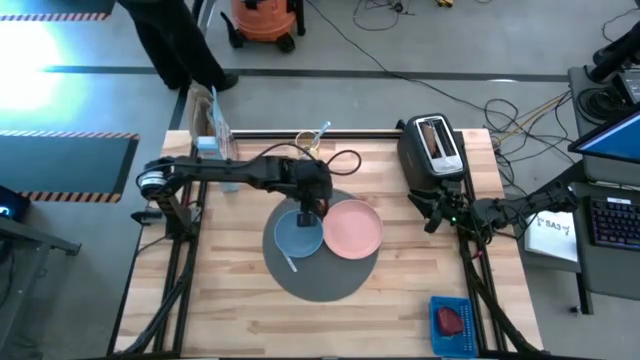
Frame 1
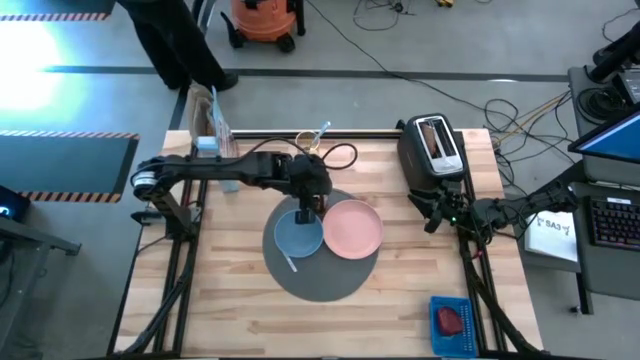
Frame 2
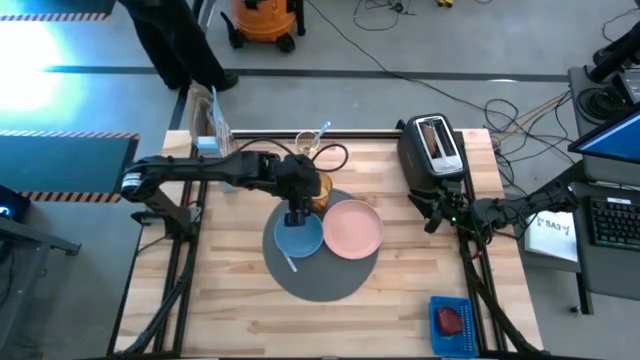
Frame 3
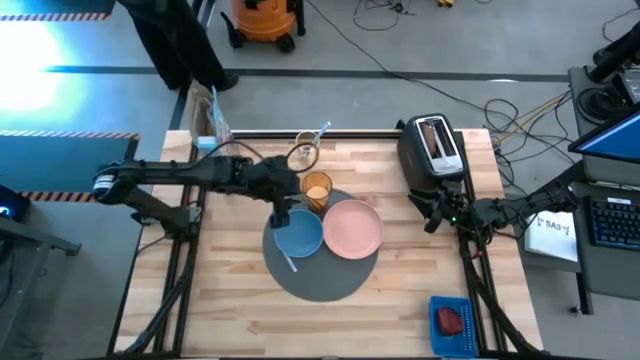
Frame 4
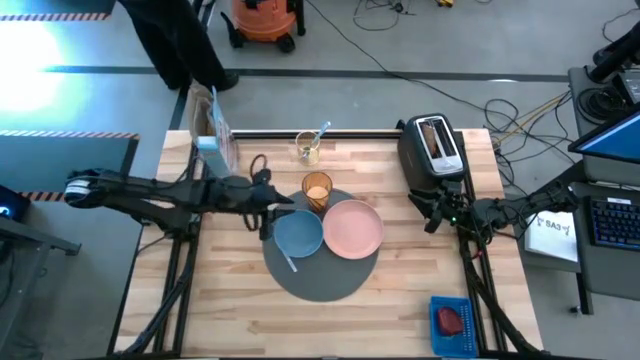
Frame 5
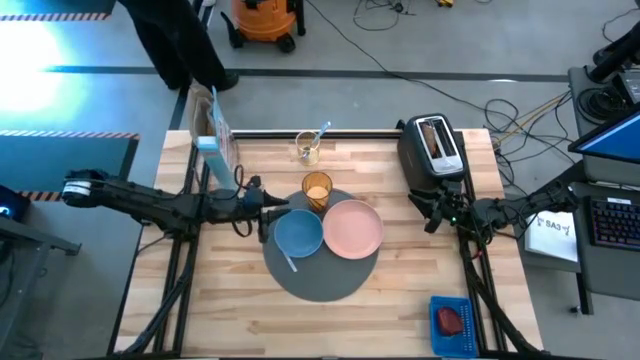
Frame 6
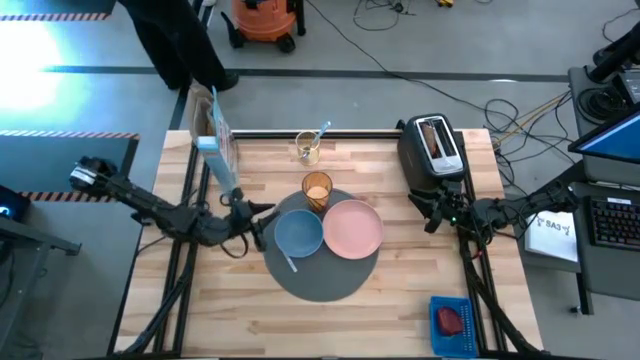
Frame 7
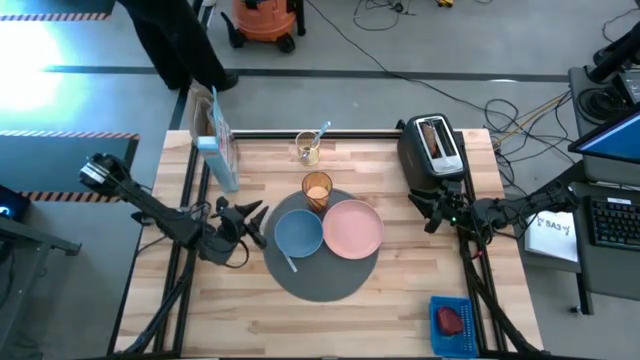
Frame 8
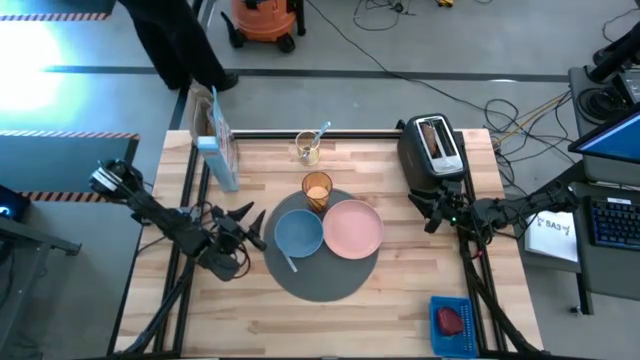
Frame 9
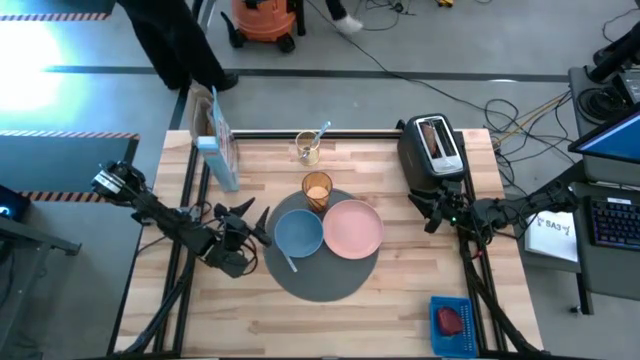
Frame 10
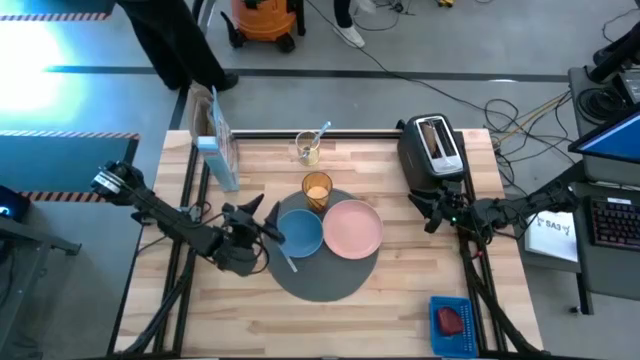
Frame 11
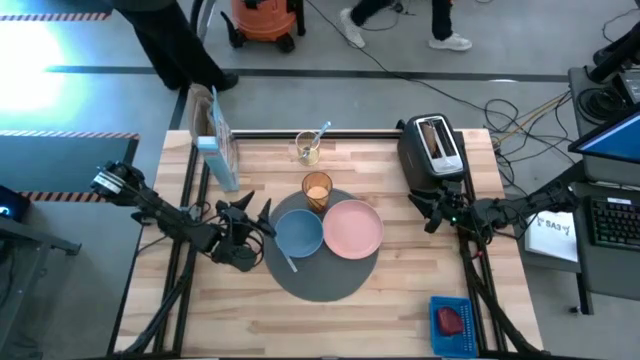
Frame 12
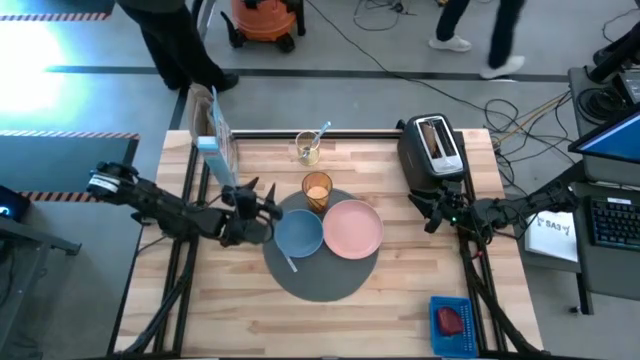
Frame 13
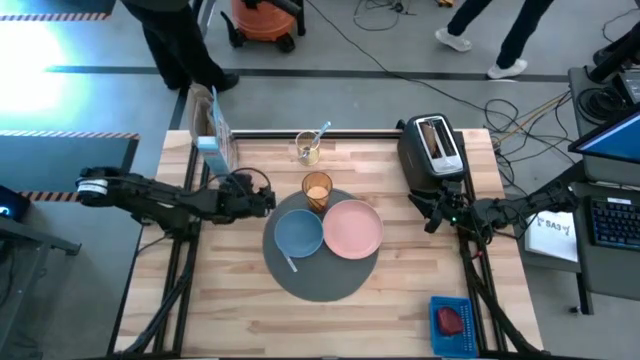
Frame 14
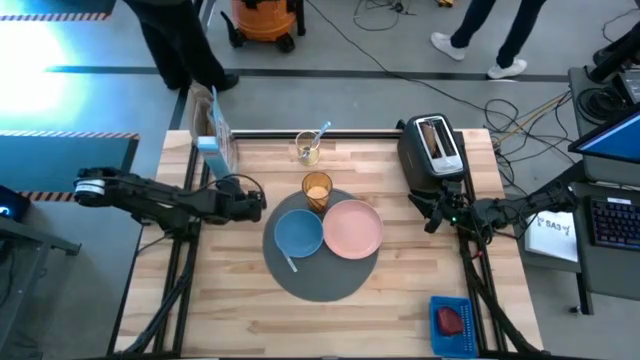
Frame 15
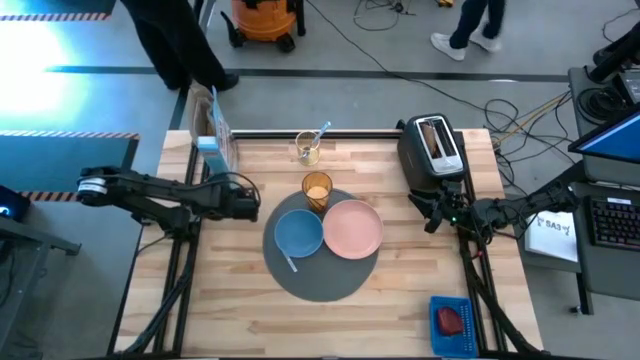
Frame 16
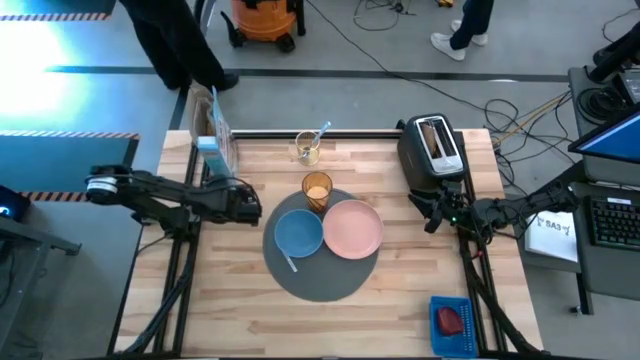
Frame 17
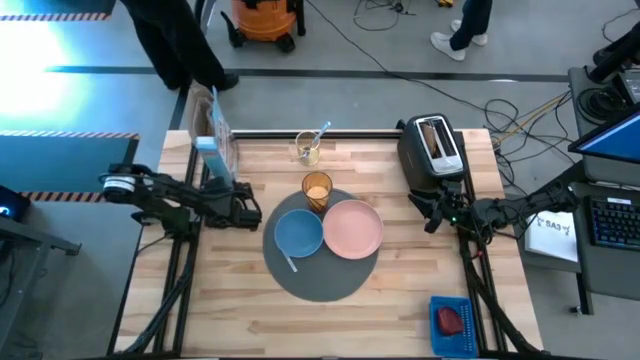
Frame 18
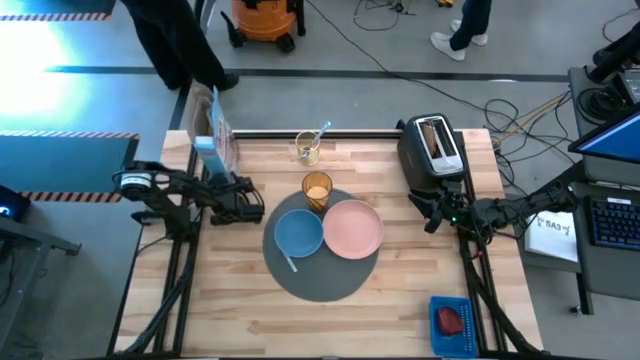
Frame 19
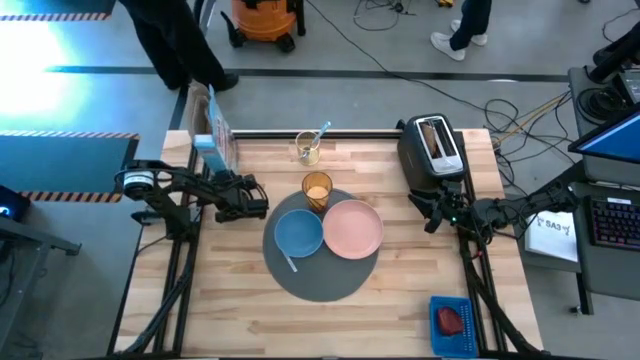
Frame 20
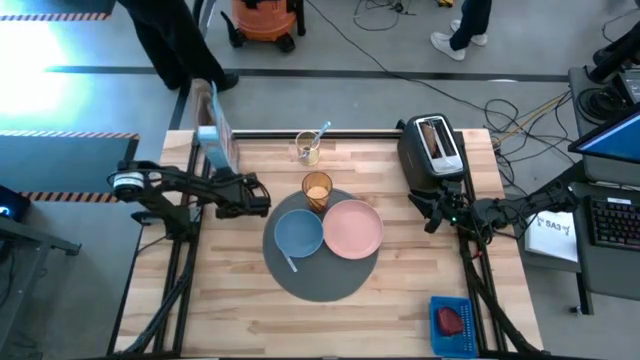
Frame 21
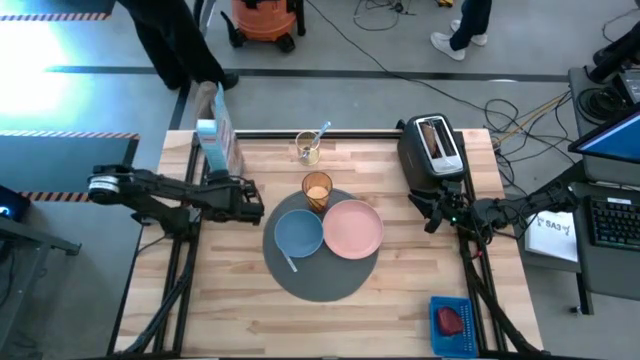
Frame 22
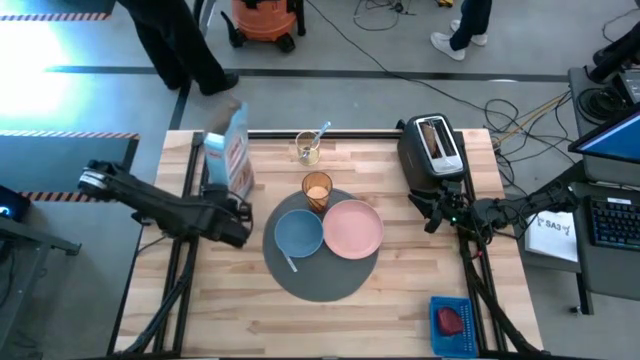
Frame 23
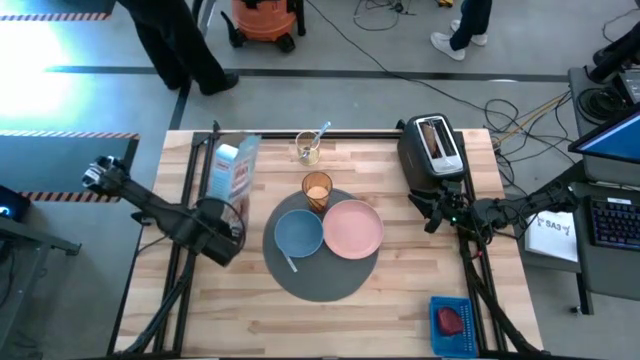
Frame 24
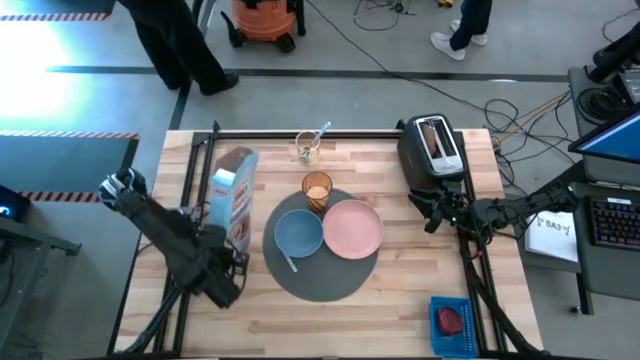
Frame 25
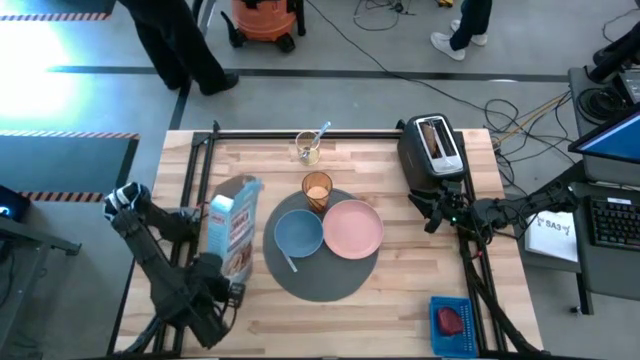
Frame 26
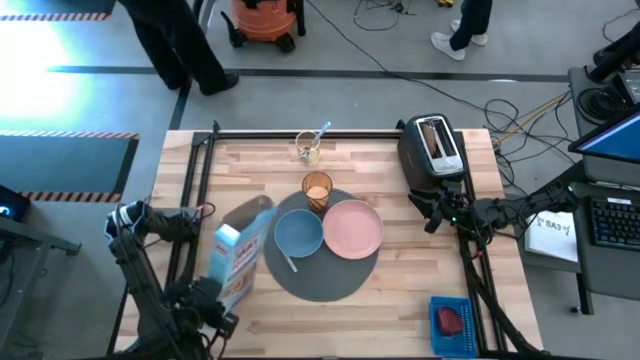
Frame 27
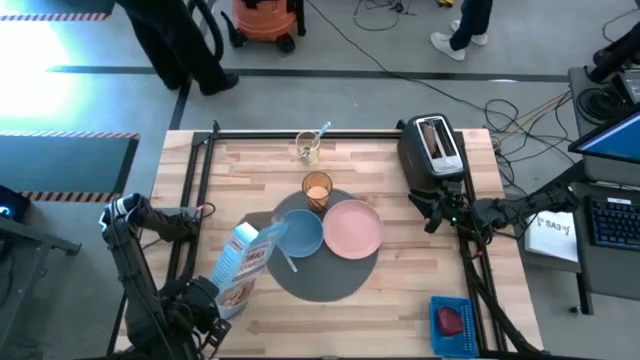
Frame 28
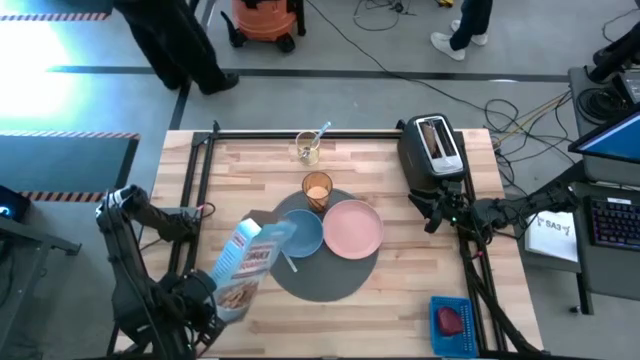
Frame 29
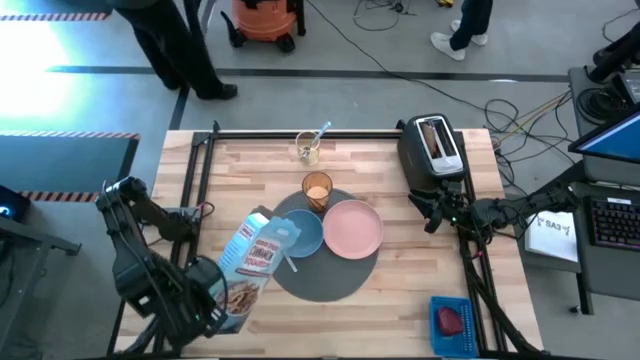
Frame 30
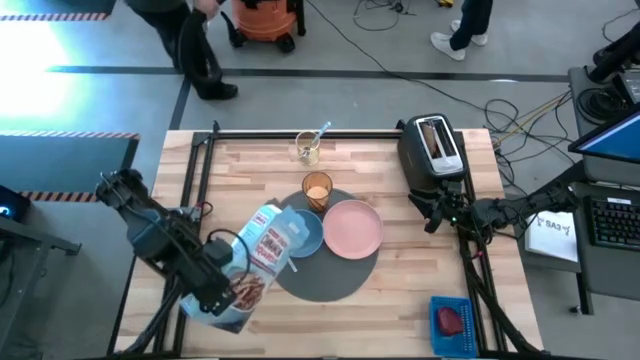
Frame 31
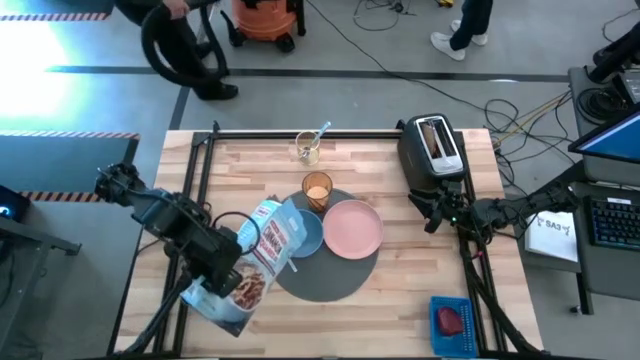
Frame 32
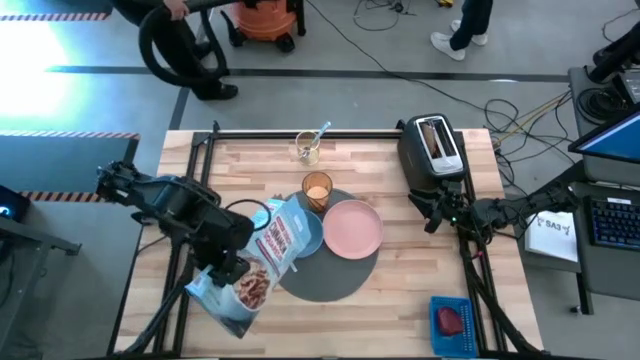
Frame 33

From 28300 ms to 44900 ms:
Task: Arrange a breakfast setting
Pour the cereal into the blue bowl

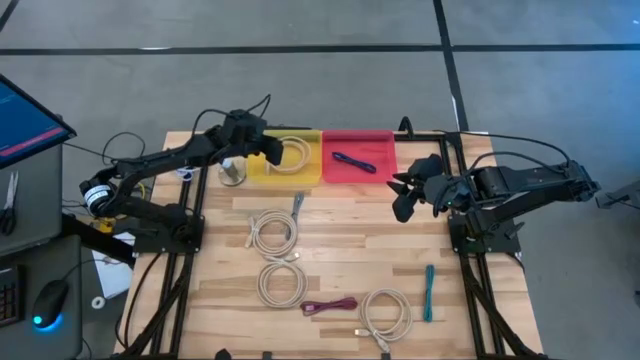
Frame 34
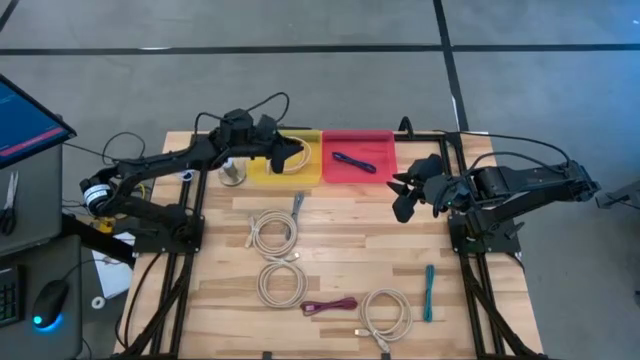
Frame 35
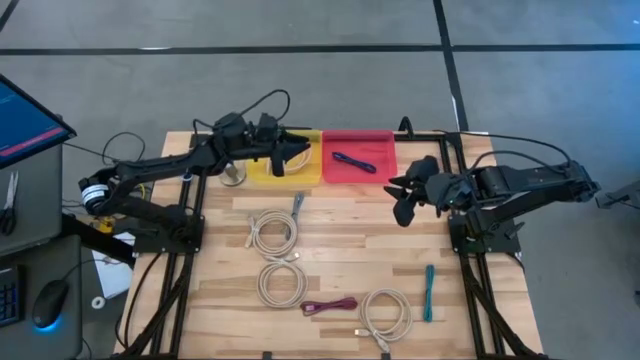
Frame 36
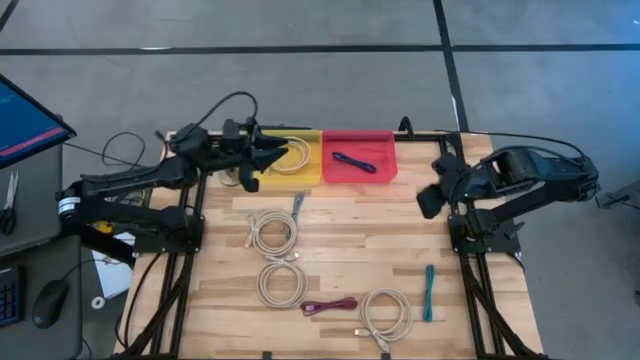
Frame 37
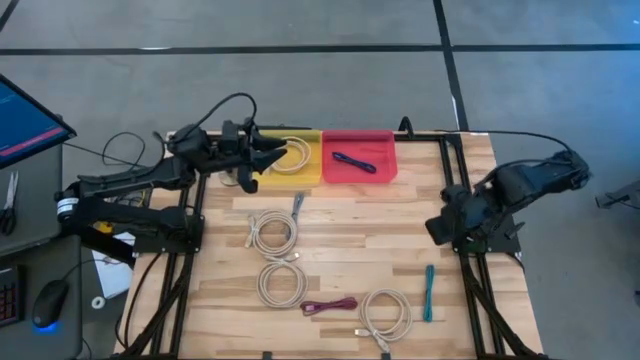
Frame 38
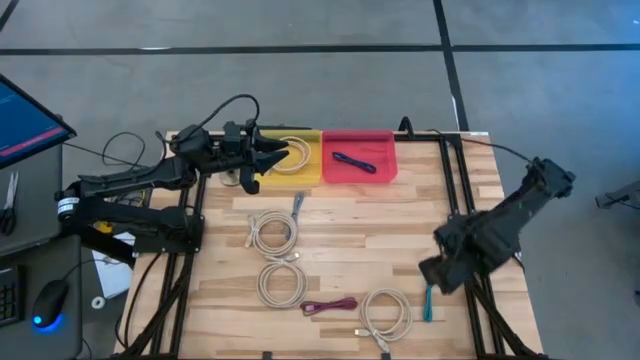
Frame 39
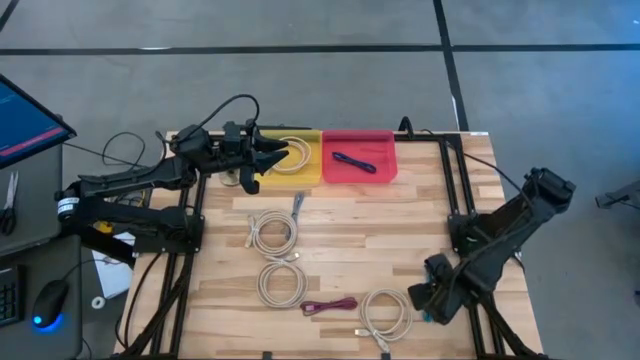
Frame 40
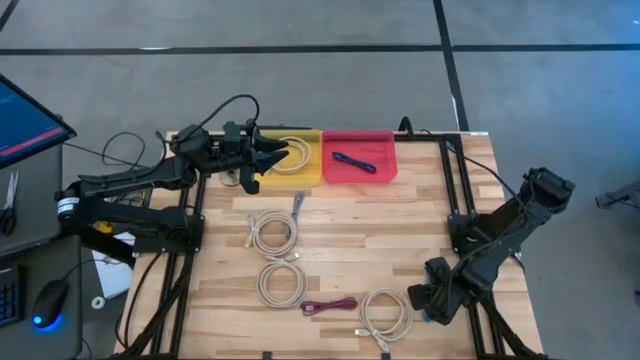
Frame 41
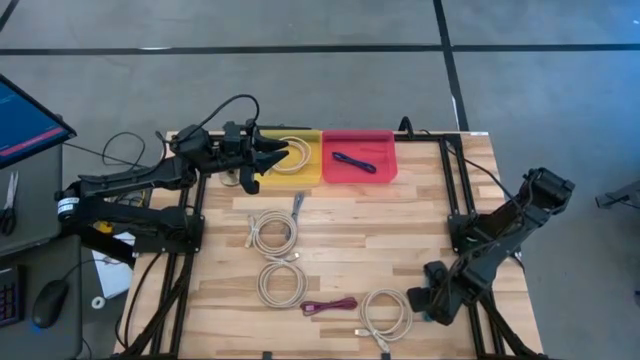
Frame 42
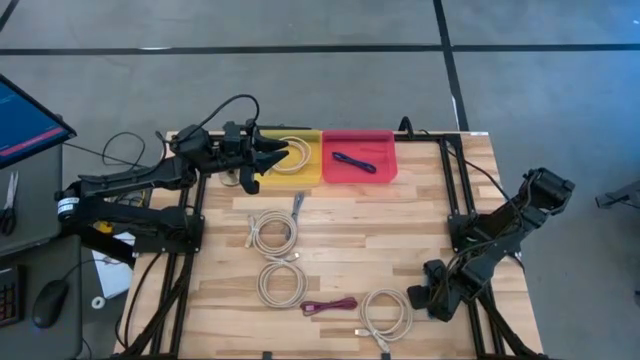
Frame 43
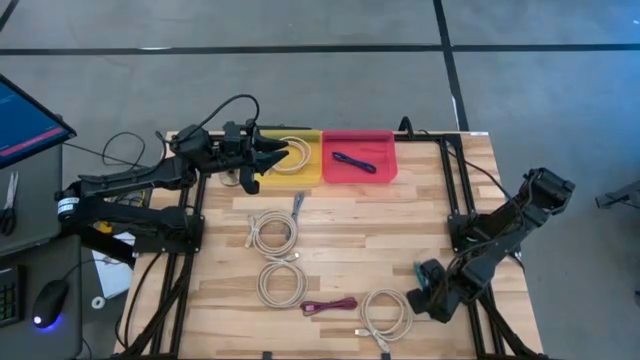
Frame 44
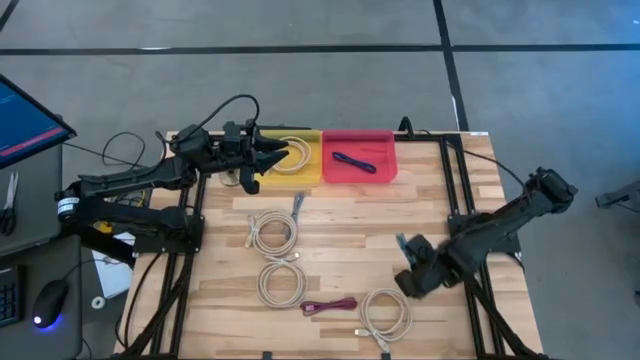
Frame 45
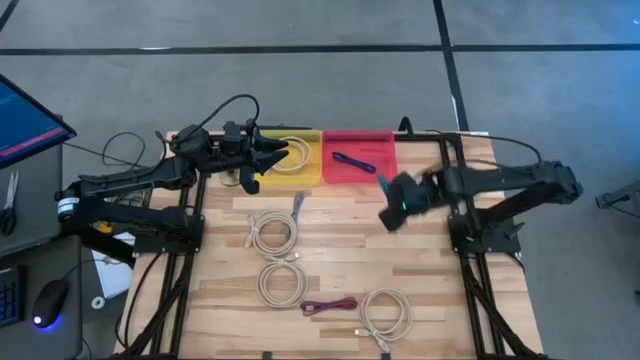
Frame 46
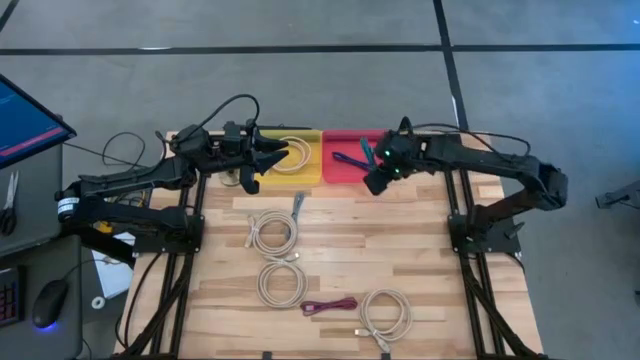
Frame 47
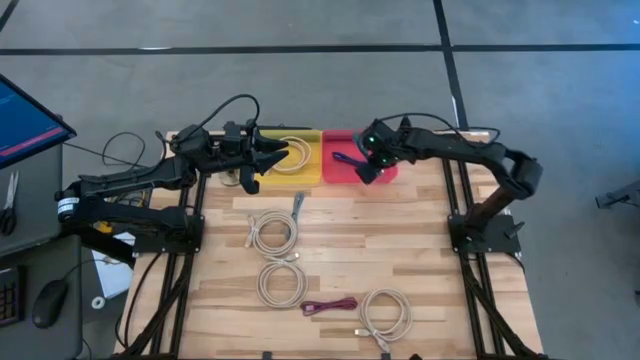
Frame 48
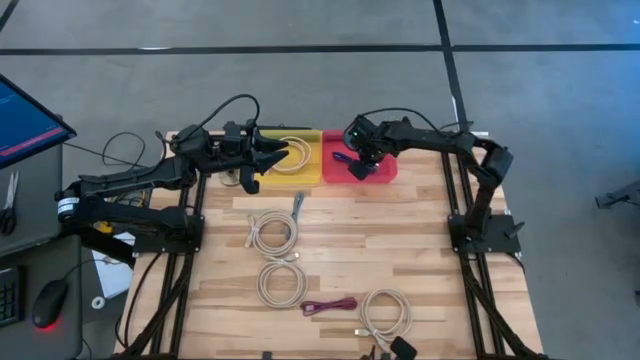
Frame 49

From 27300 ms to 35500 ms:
Task: Pick & Place USB Port
Put the small black and light blue charger cable into the red bin
